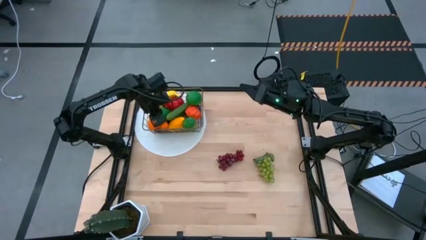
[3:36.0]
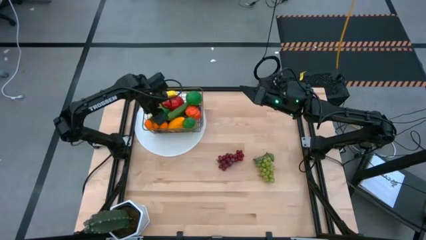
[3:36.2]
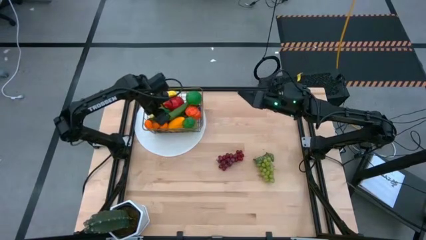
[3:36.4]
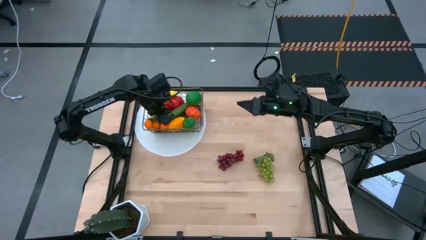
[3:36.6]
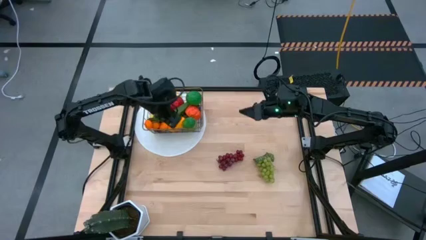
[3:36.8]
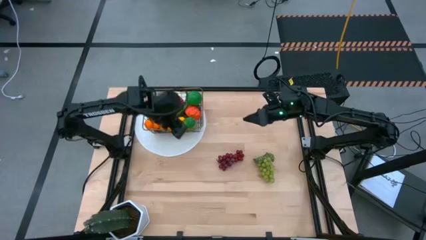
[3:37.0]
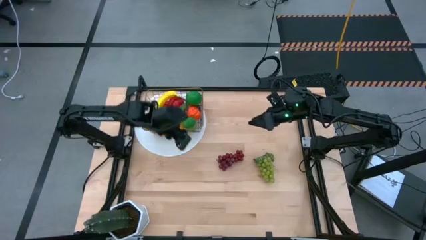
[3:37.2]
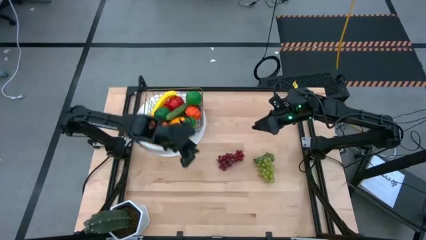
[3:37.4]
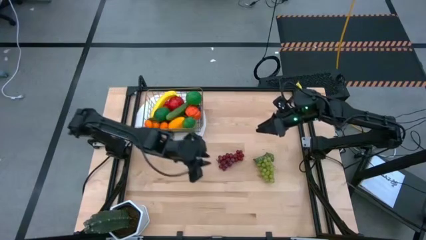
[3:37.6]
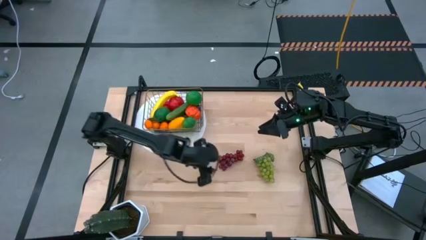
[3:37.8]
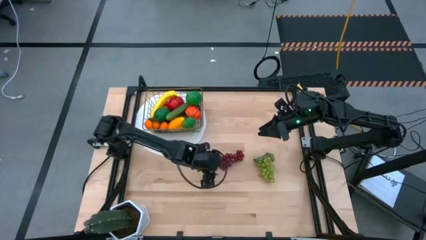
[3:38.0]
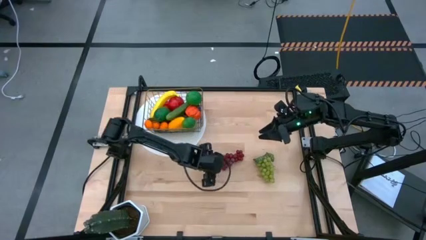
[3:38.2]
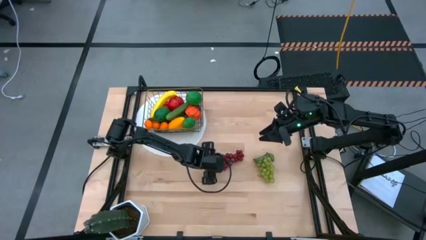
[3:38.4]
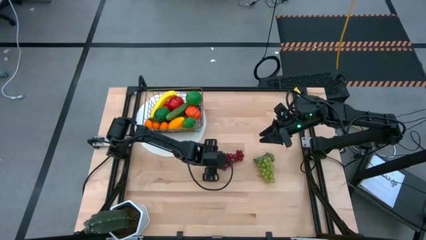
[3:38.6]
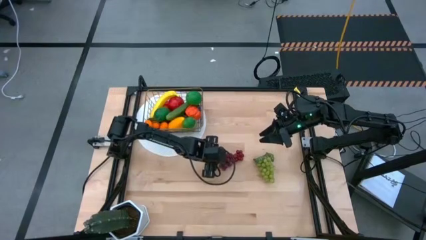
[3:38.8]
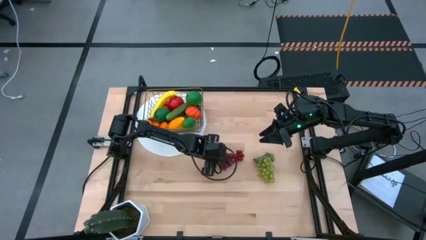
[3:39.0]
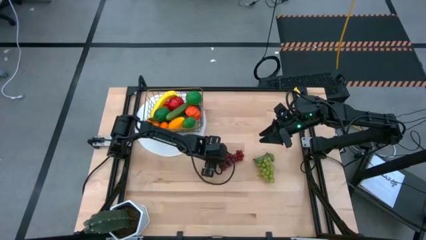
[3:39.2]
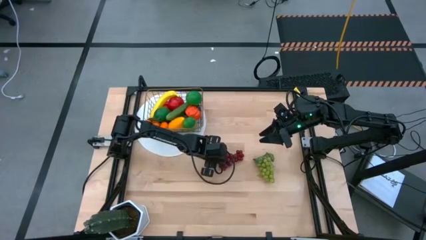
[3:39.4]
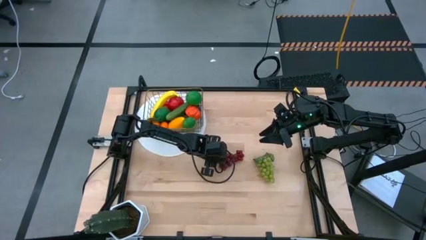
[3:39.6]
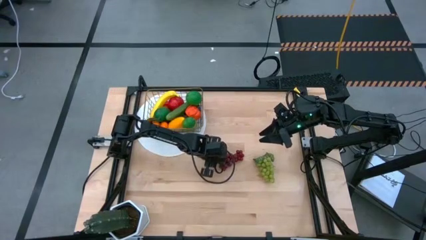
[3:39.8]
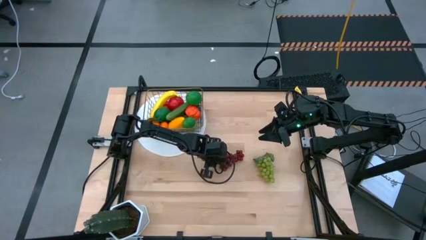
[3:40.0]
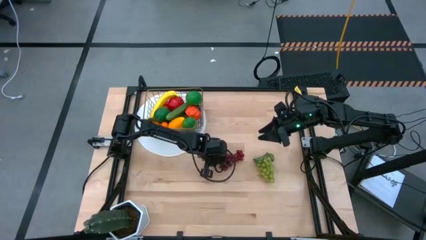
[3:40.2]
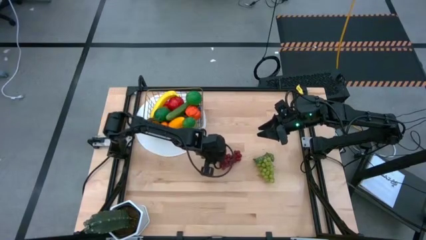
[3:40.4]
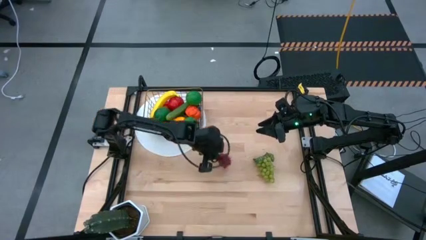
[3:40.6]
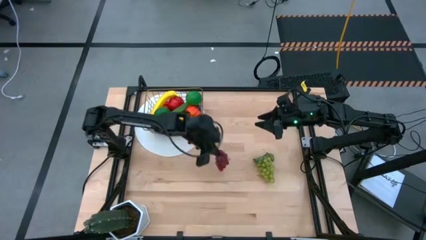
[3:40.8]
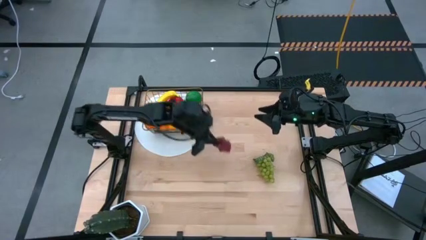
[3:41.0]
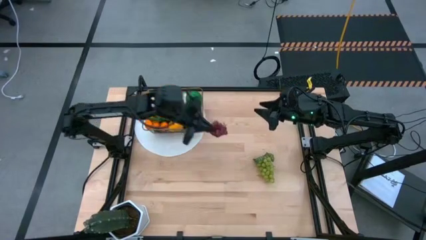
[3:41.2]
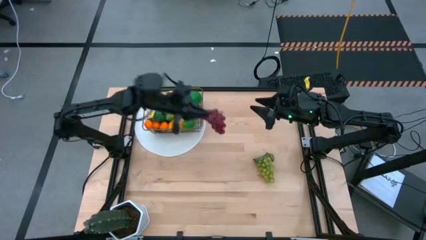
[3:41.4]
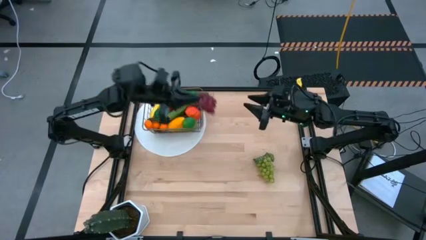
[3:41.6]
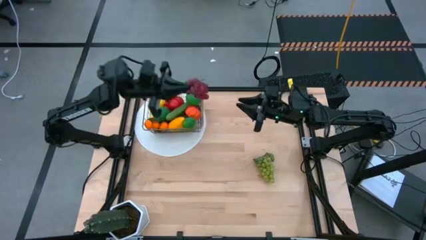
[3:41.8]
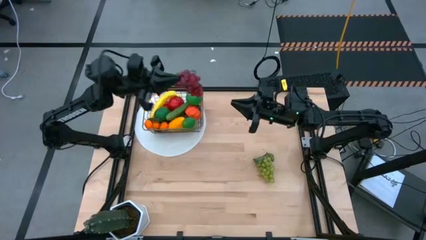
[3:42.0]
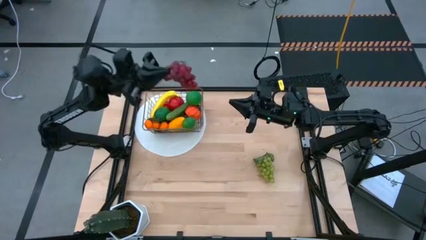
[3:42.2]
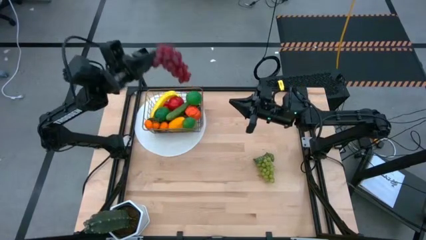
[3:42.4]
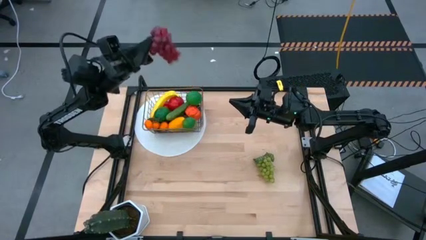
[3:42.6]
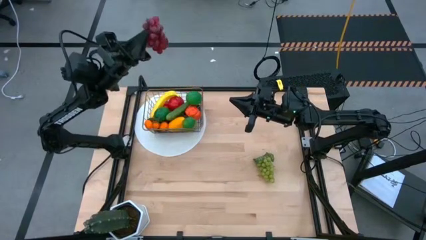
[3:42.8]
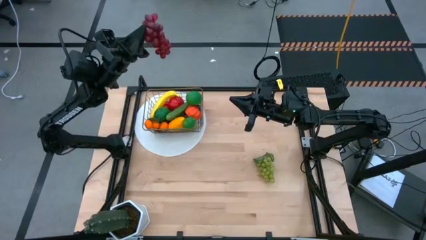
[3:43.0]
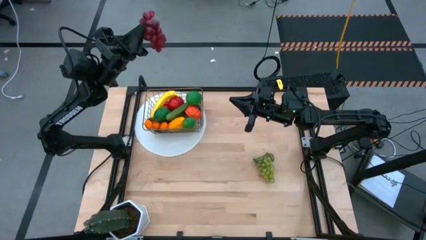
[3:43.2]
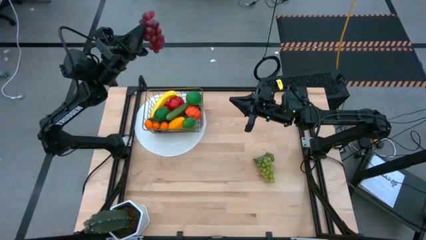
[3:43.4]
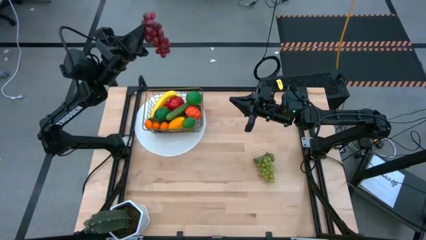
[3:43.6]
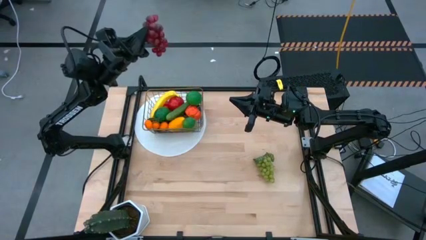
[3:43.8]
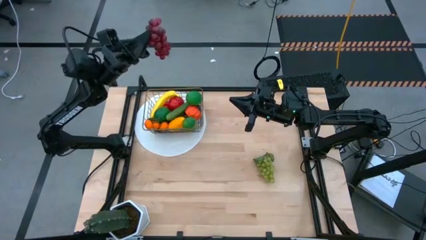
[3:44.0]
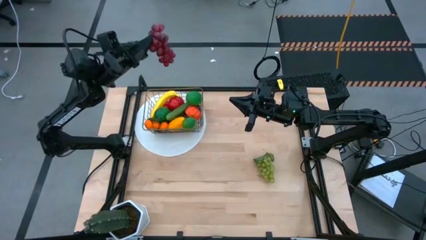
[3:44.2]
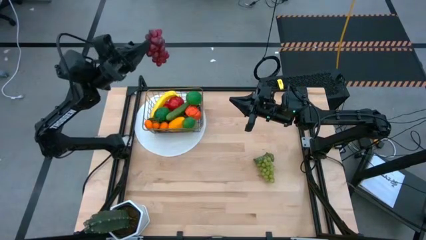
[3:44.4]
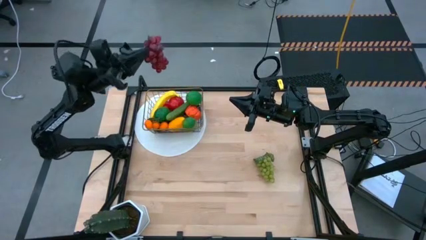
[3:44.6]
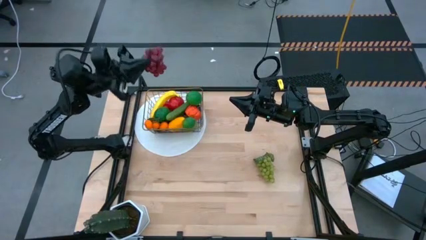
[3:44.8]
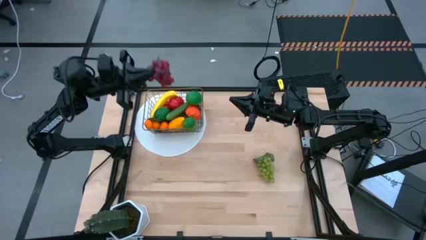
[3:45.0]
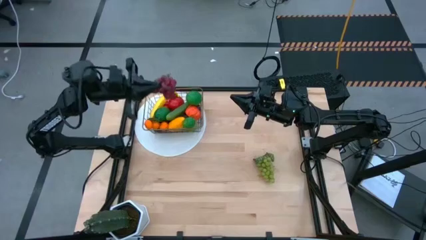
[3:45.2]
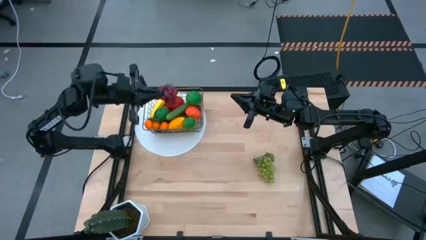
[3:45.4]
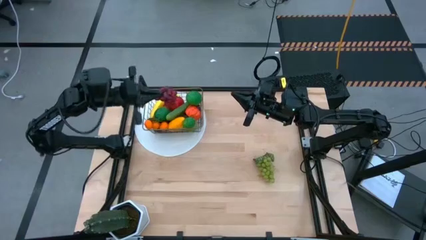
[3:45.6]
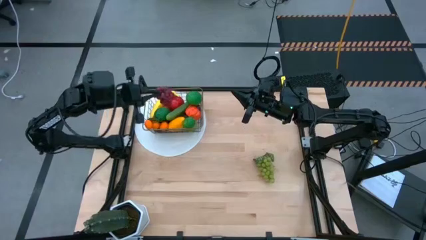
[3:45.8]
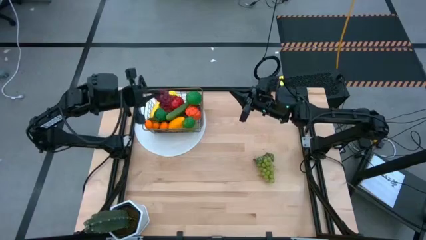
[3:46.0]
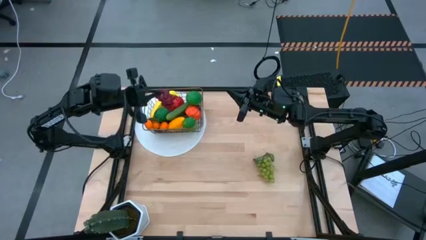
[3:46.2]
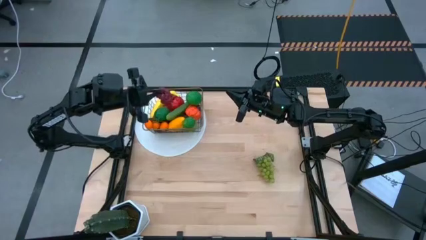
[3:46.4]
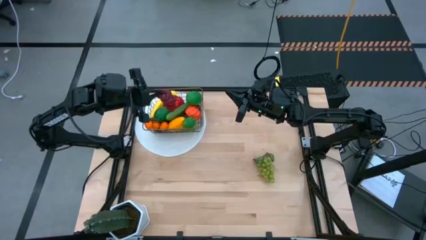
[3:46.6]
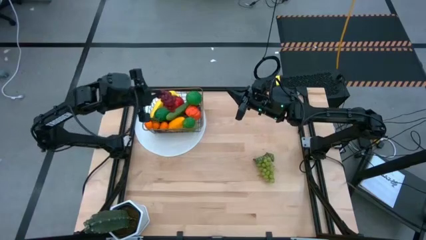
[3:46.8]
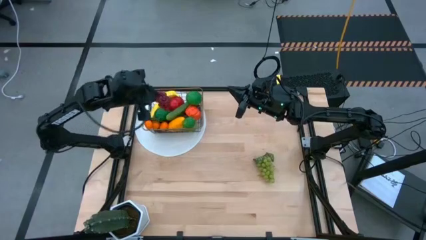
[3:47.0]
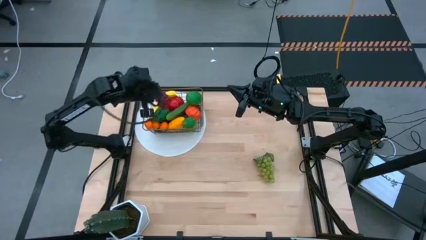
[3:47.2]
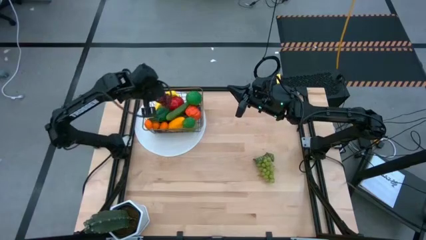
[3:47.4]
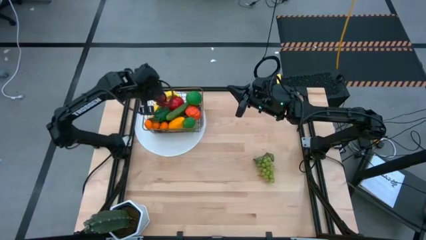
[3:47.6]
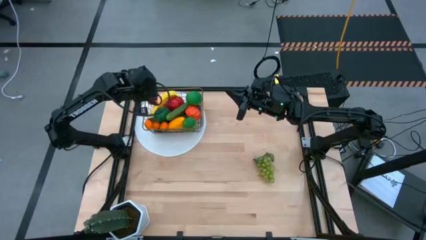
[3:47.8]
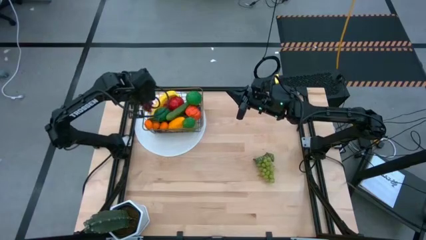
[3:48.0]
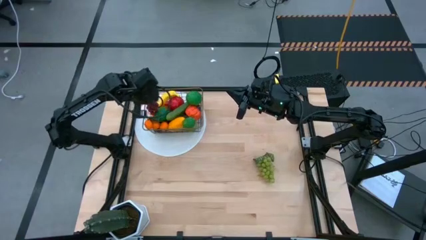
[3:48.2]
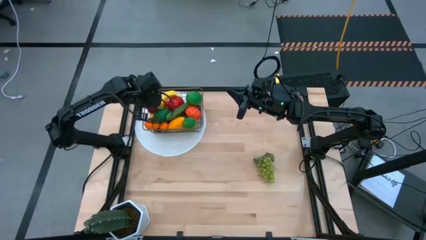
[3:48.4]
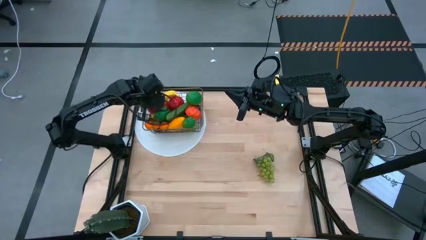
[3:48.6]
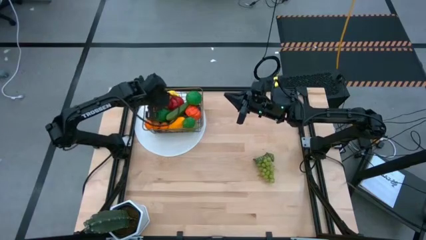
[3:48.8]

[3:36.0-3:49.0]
Task: Build produce basket
Put the red grapes into the wired basket

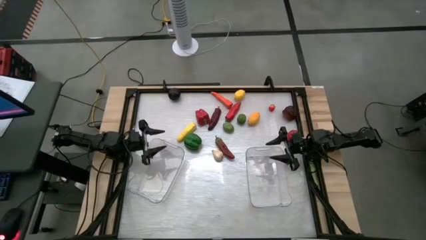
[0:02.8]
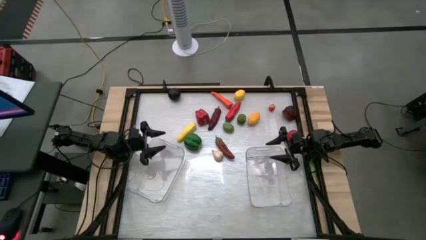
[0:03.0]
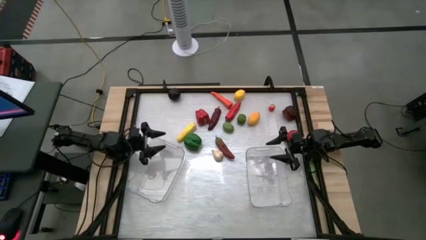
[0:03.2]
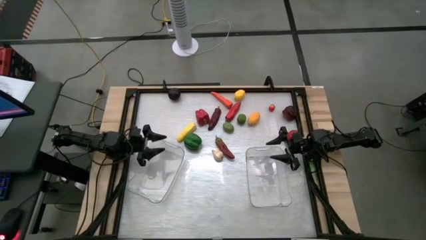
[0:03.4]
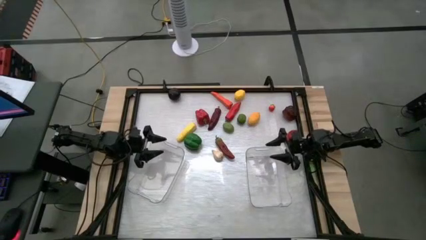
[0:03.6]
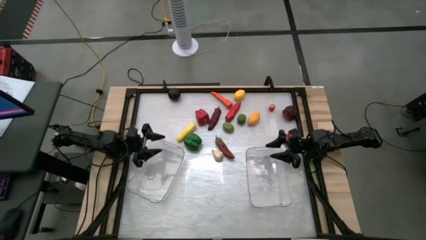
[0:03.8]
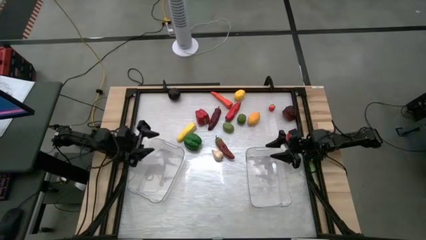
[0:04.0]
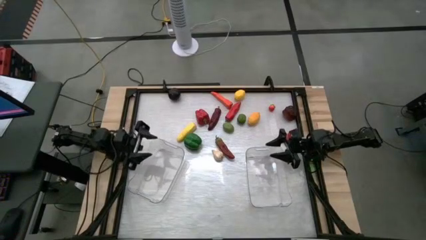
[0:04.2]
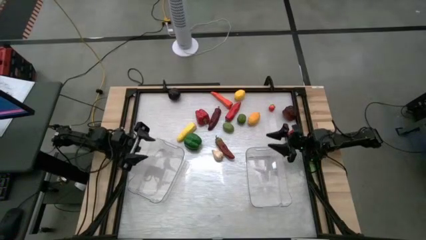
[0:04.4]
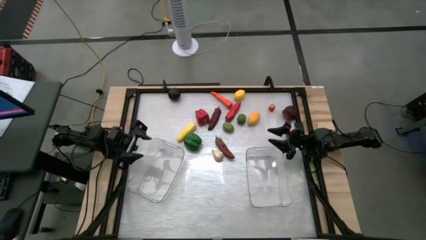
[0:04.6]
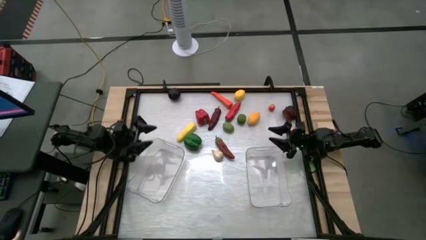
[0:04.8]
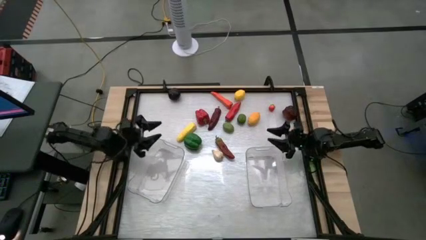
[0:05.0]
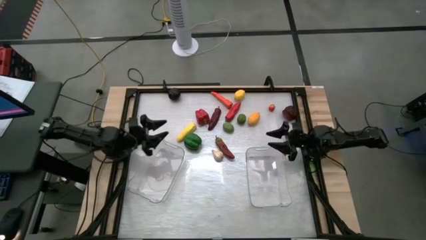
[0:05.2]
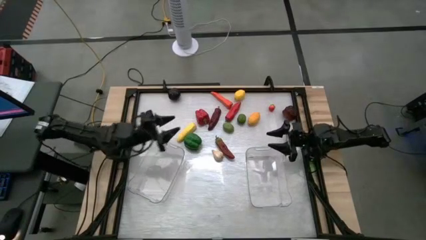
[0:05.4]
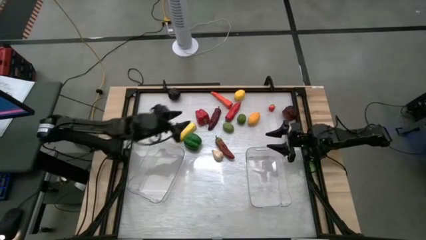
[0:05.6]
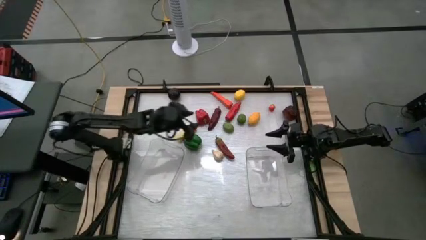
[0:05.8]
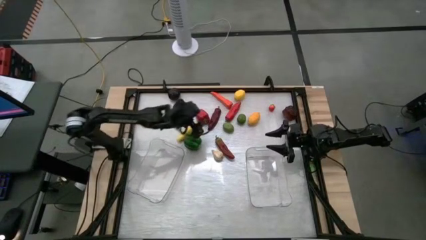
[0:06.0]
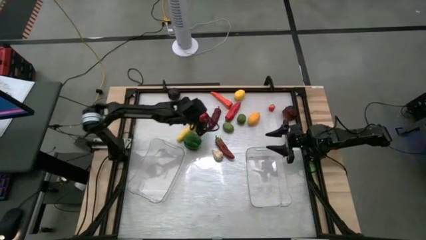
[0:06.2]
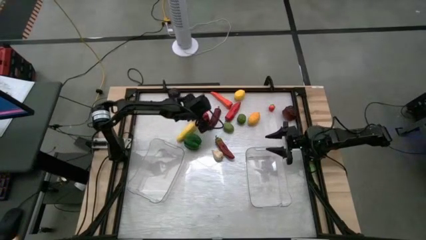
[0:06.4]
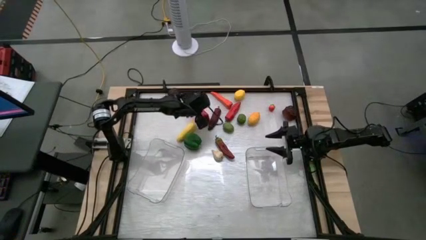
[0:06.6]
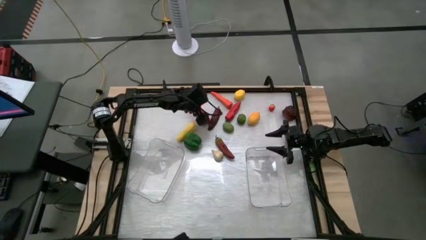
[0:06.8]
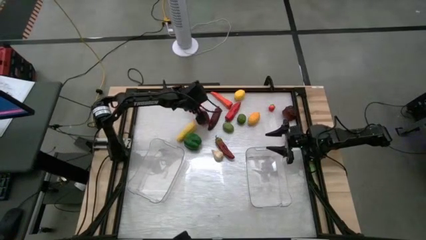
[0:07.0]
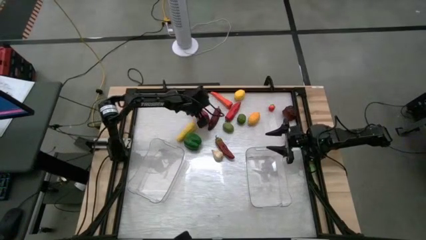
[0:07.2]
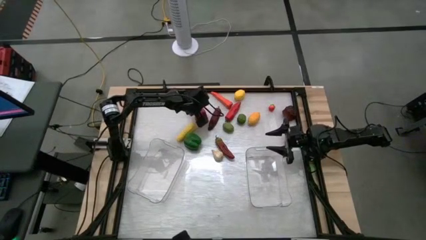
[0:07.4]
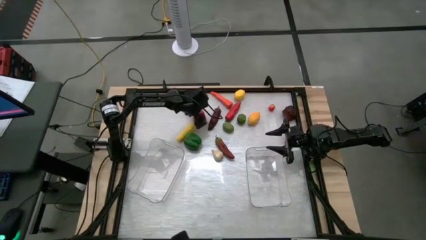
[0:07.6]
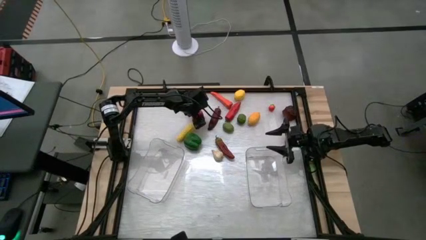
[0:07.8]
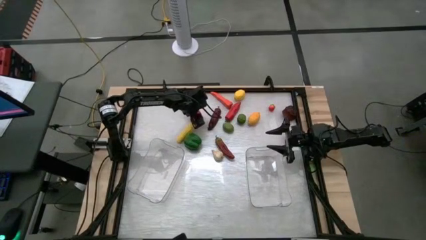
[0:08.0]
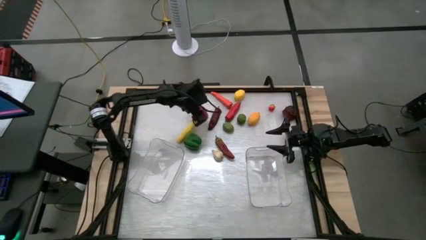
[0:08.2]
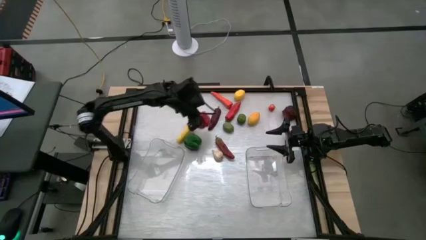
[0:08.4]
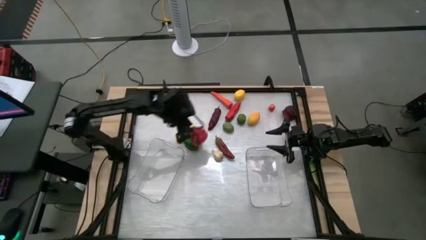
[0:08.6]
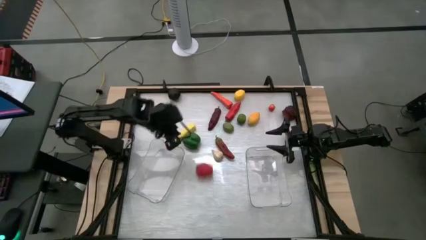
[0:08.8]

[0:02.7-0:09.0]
Task: Sort produce into baskets
Put the red bell pepper into the left transparent bin
